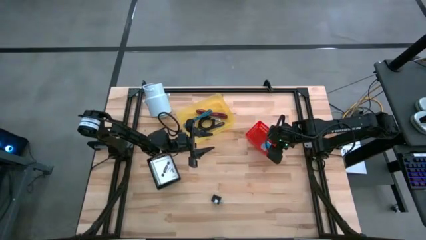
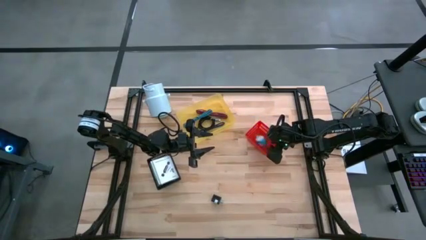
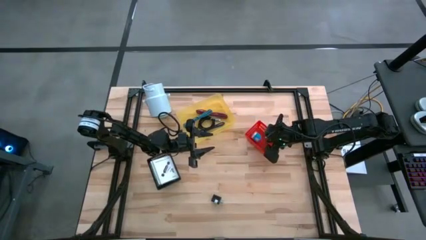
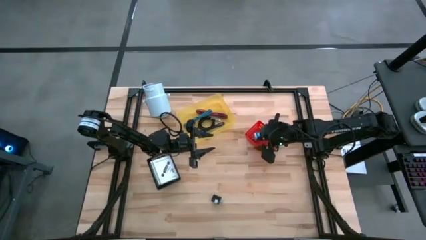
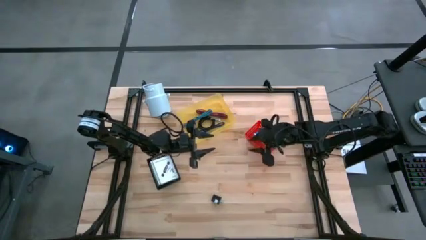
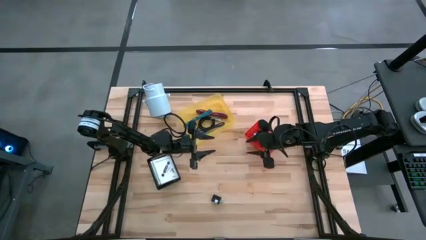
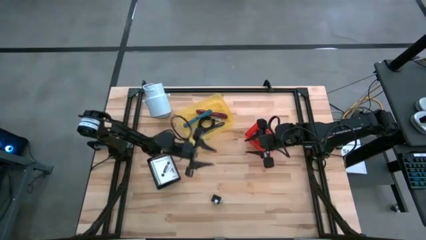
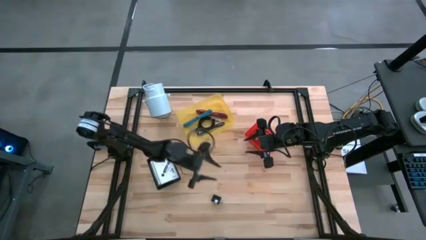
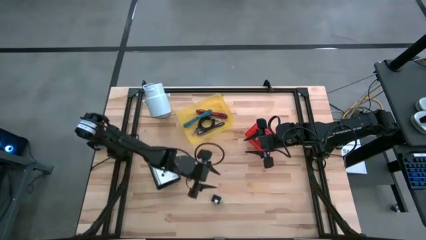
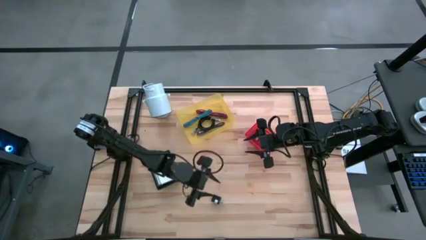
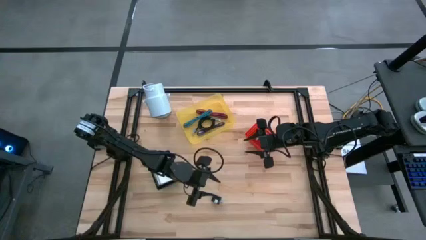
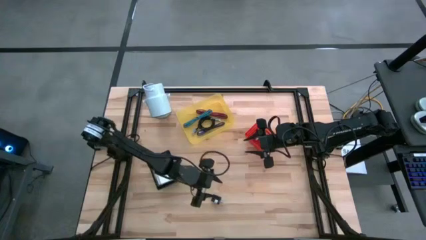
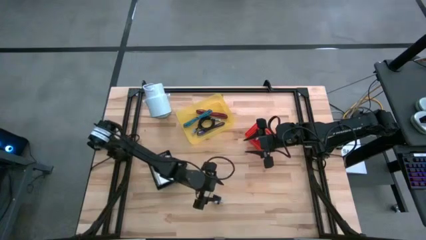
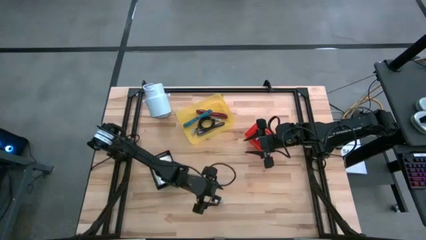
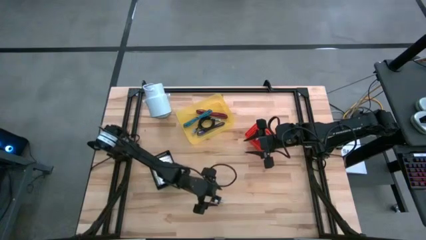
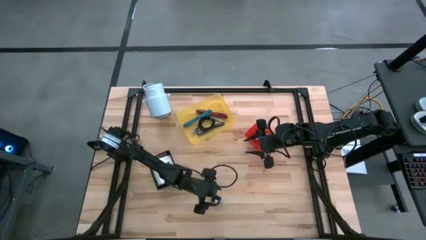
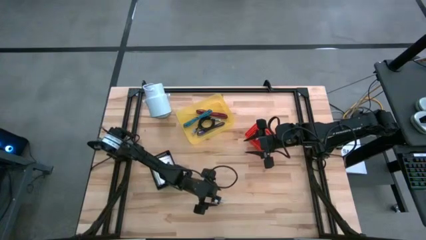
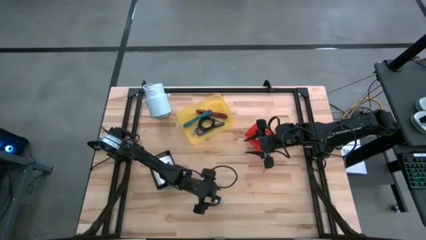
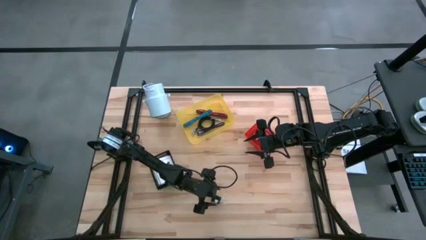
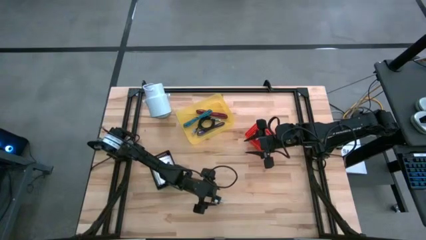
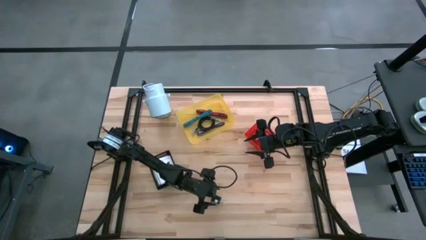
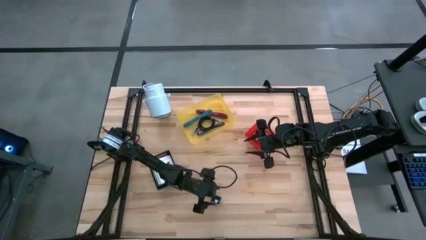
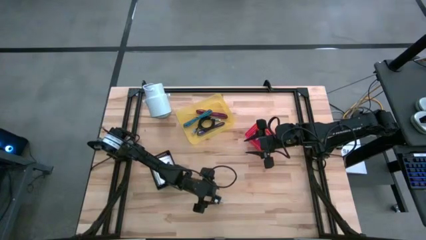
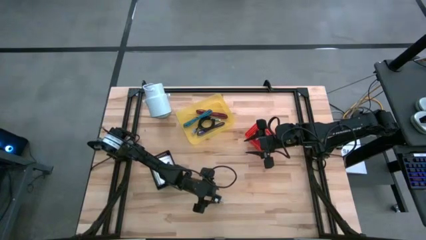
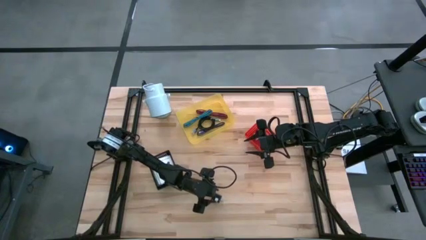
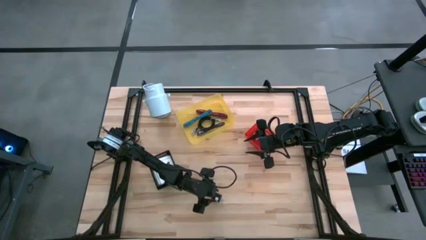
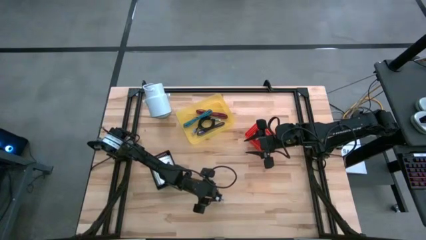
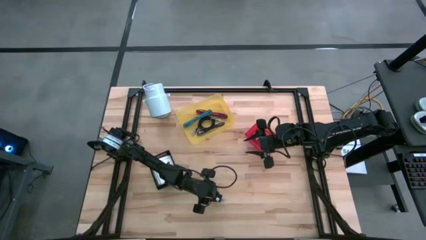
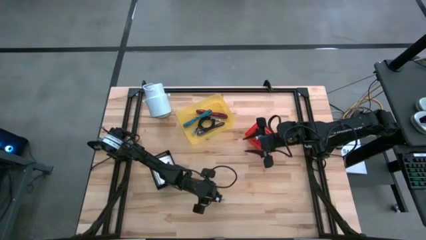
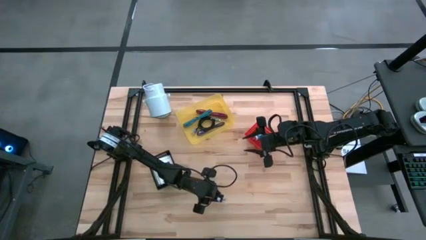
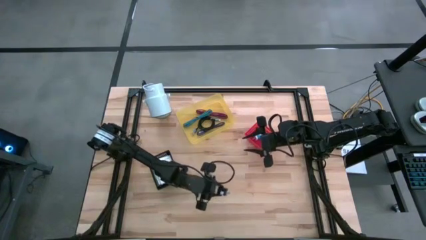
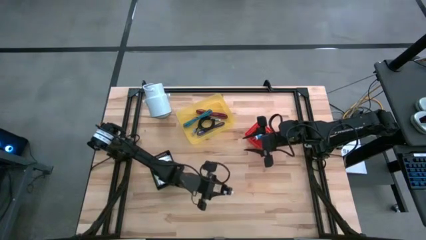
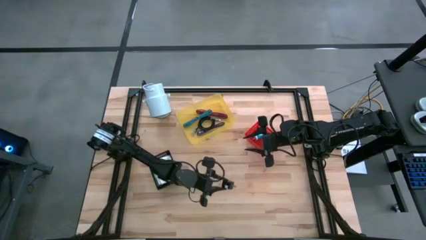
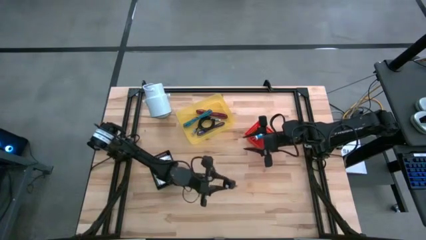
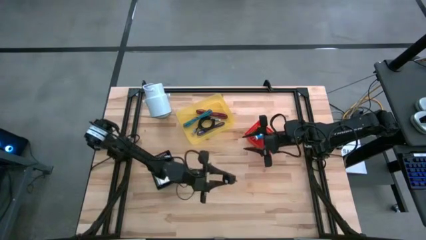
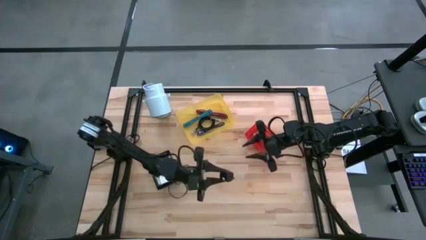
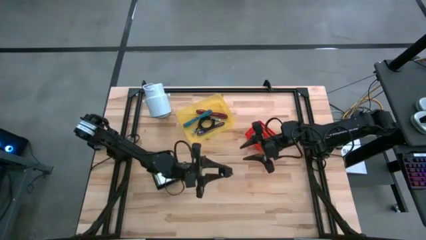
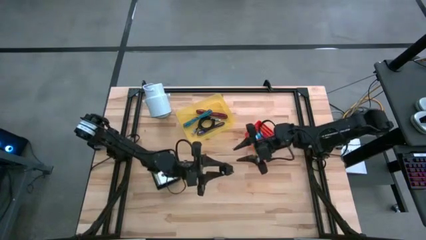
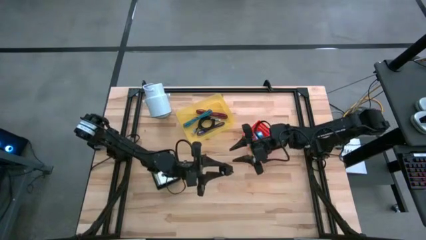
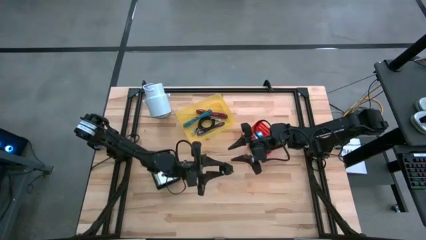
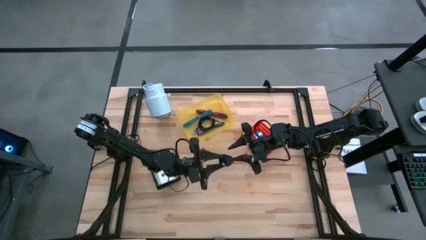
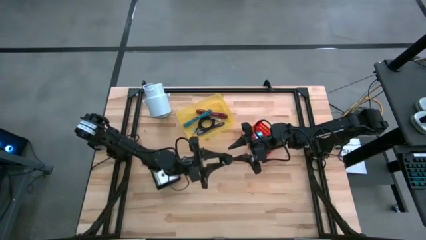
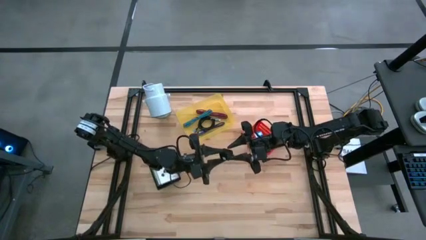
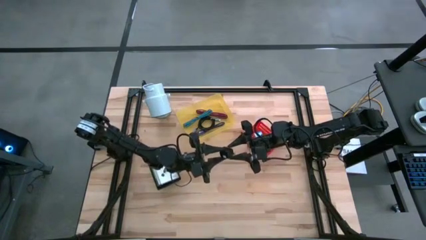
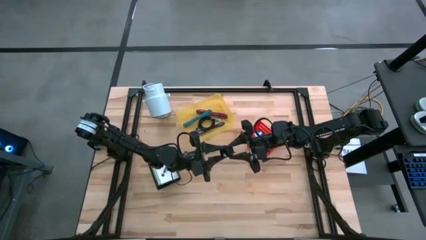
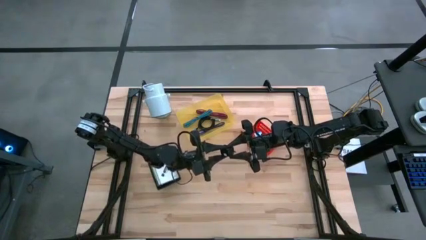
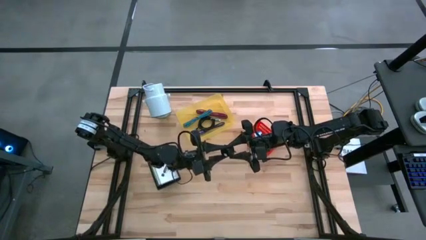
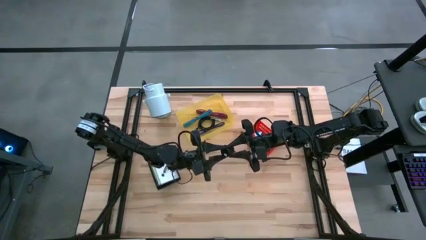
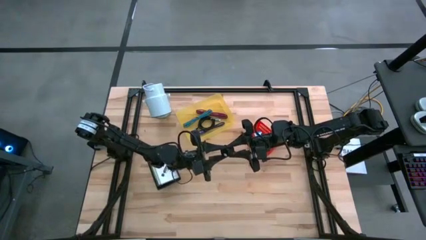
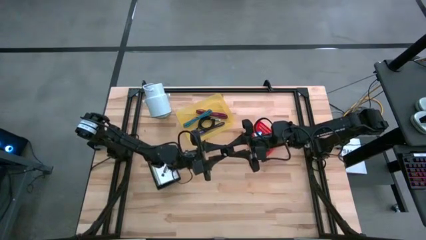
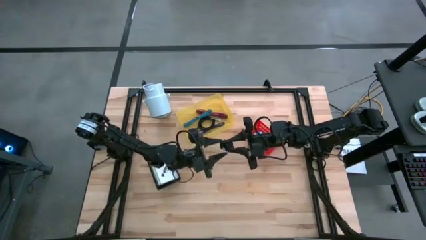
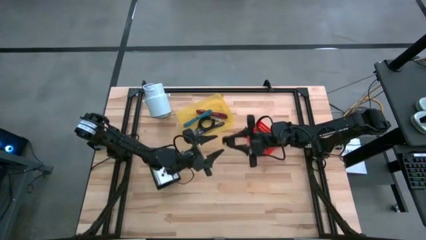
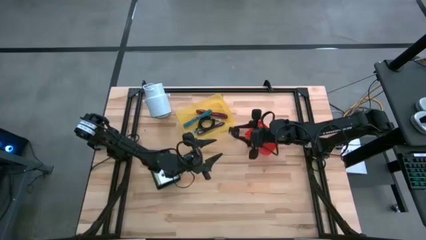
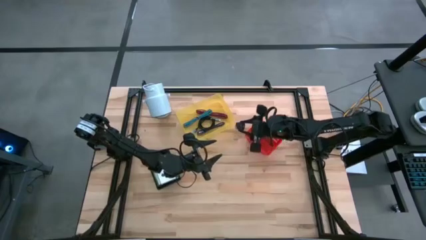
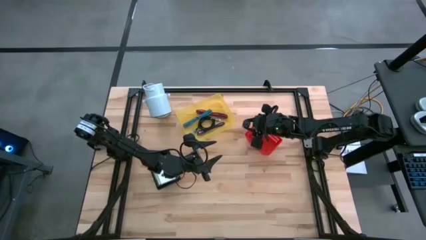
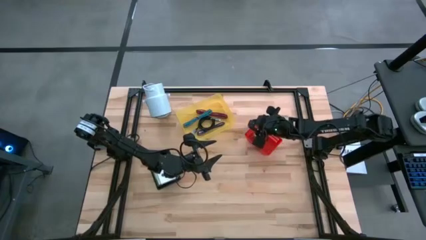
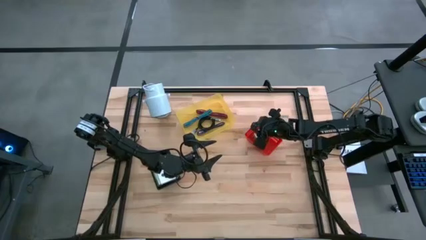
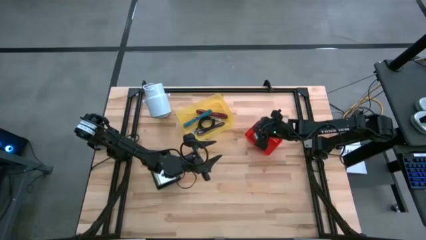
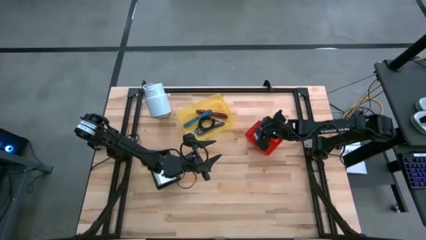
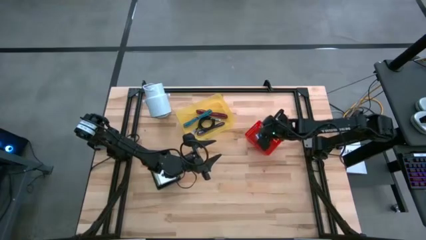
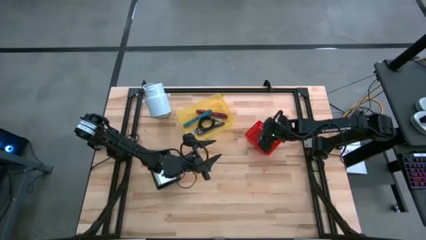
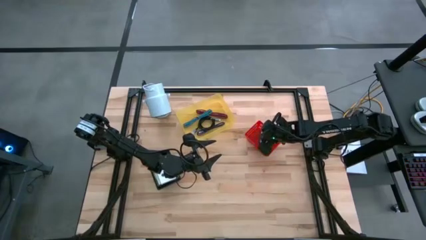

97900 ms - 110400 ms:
Task: Pick and place items into bin
Put the black charger adapter into the red bin

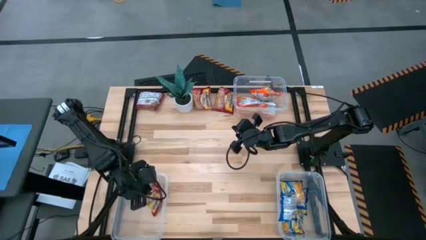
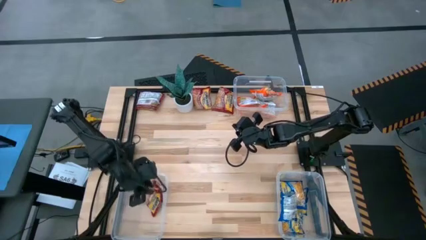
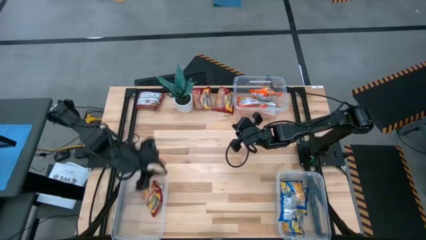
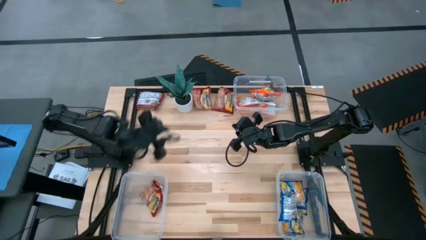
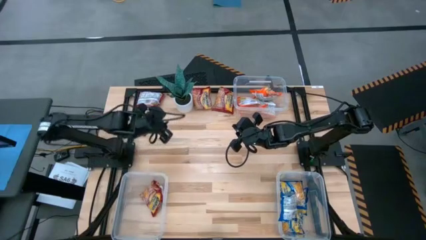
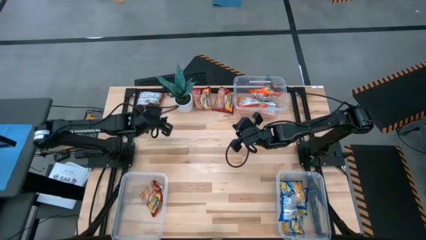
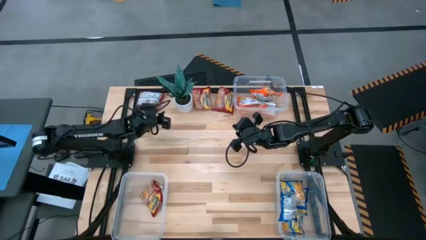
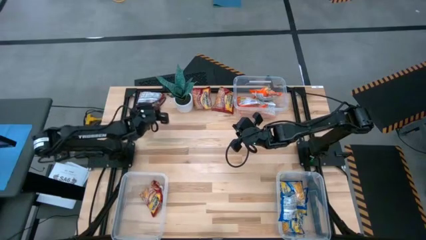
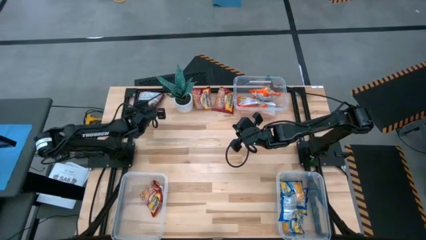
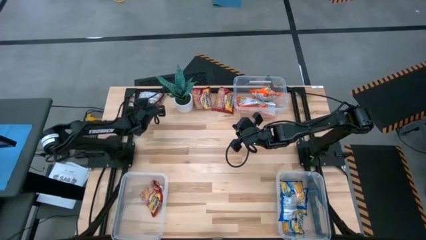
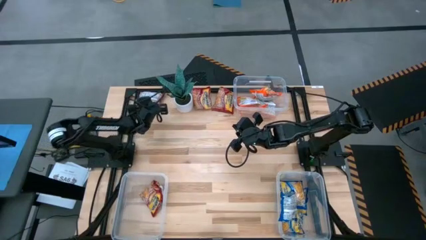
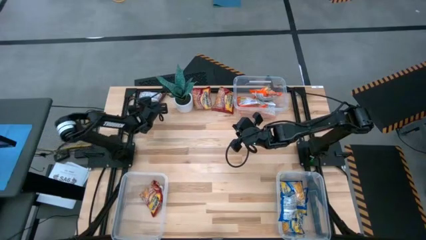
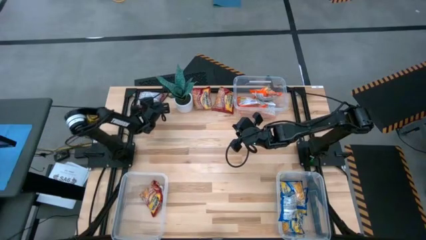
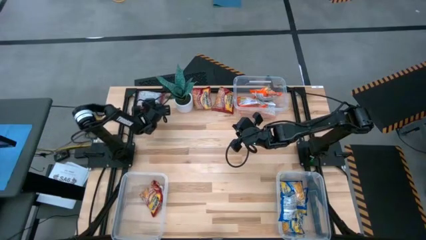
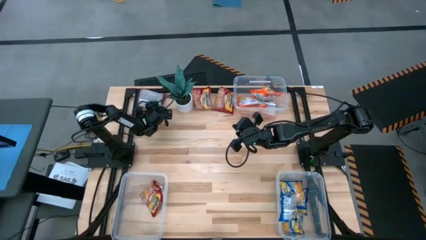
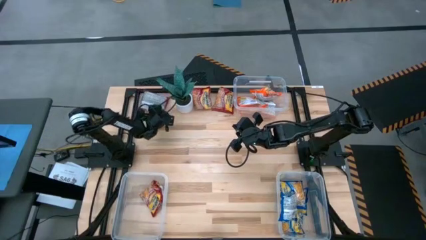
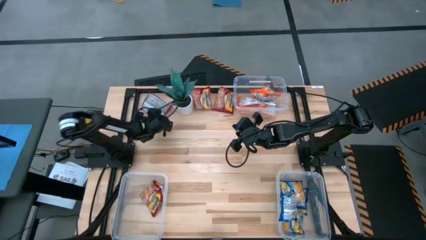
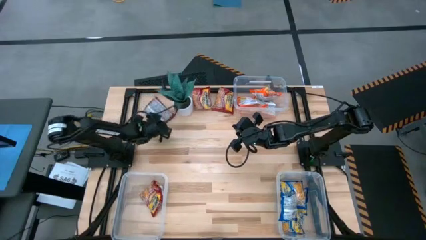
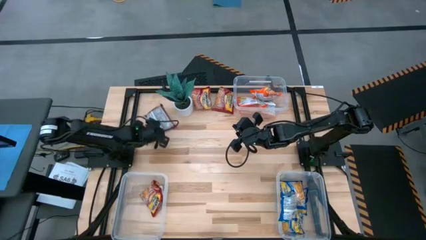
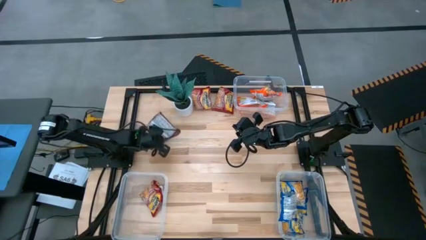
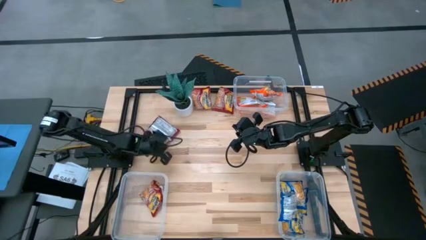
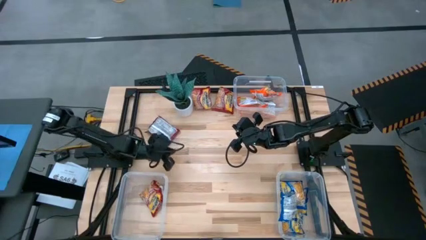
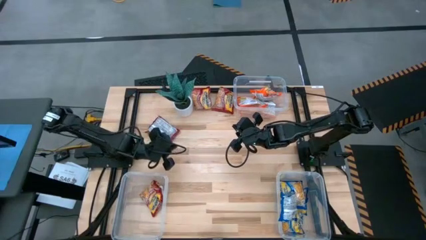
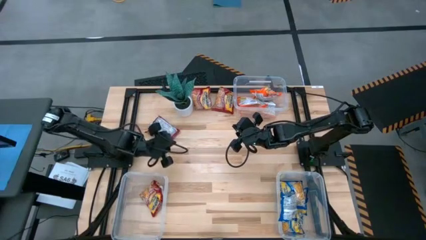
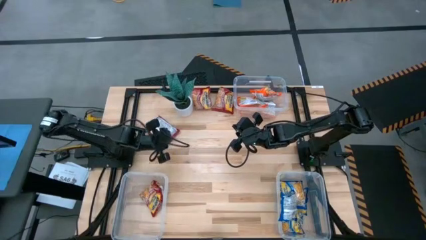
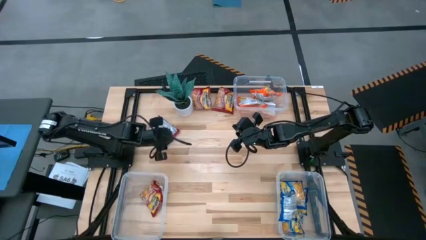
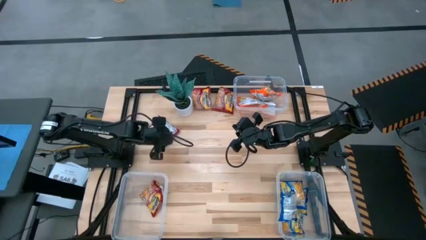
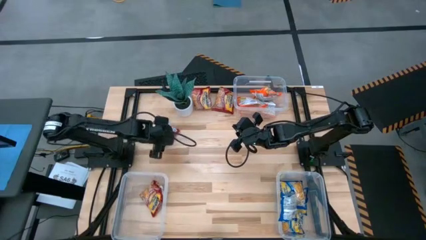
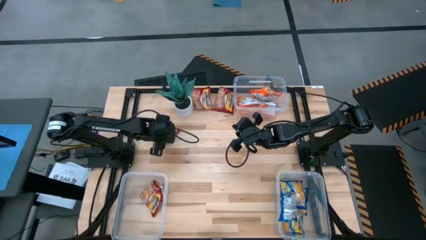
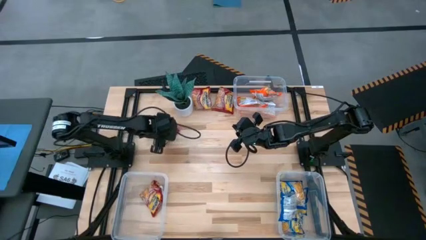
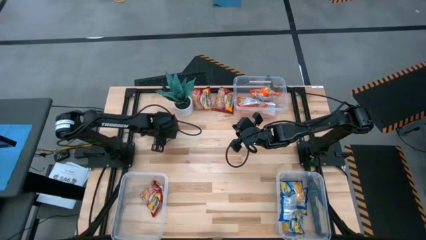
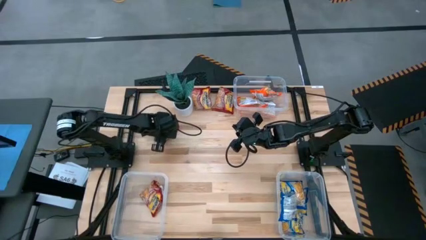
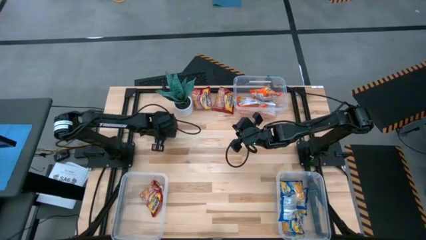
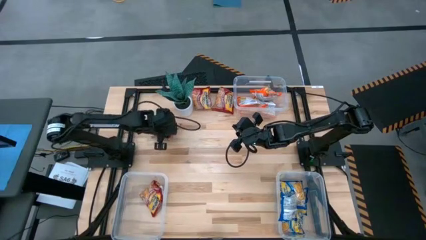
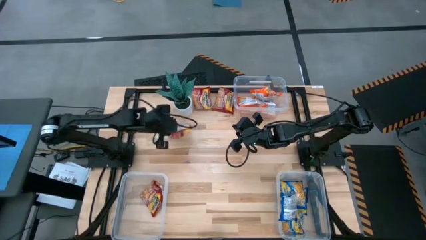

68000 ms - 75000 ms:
Task: Sort Maruchan noodles
Put the red noodle pack into the bottom left transparent bin
